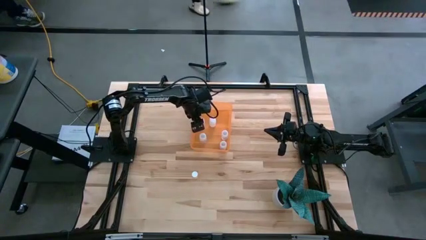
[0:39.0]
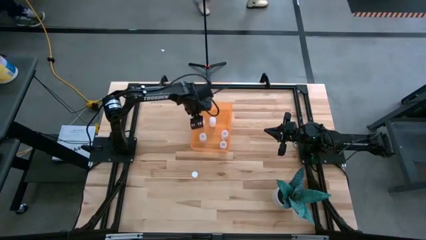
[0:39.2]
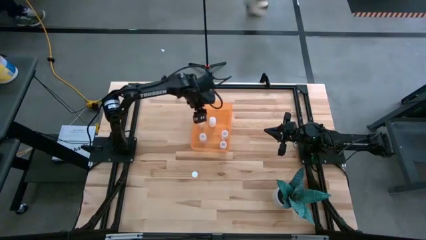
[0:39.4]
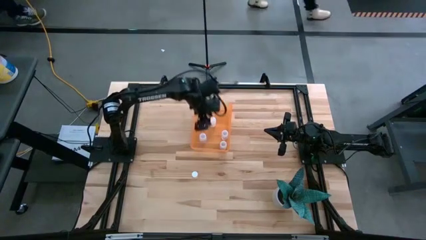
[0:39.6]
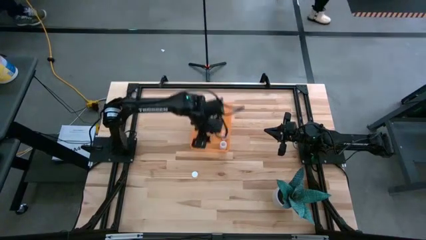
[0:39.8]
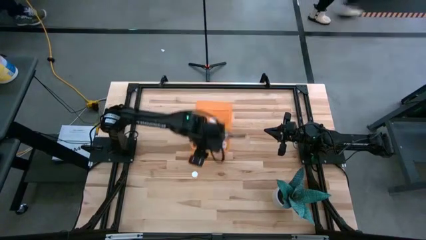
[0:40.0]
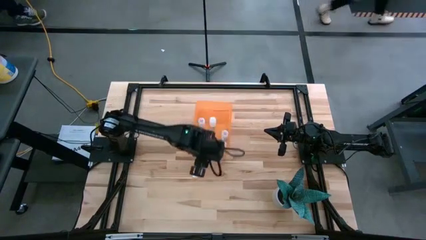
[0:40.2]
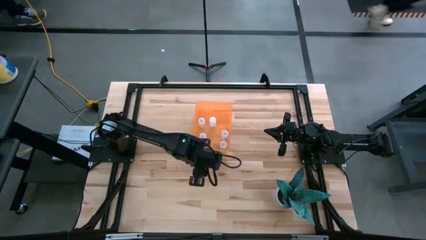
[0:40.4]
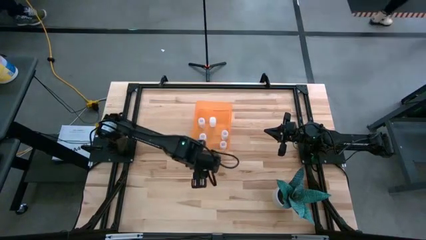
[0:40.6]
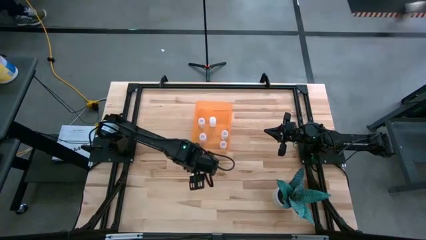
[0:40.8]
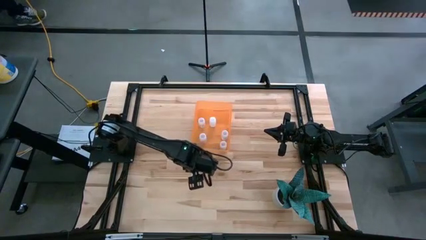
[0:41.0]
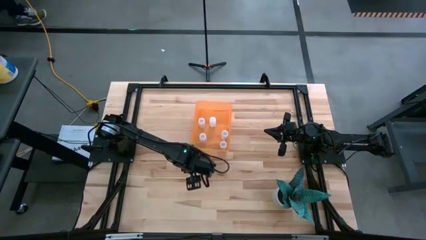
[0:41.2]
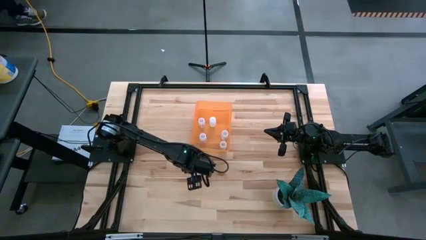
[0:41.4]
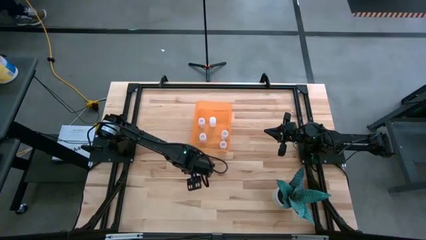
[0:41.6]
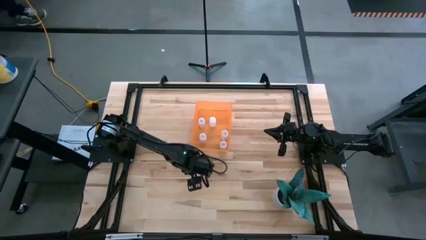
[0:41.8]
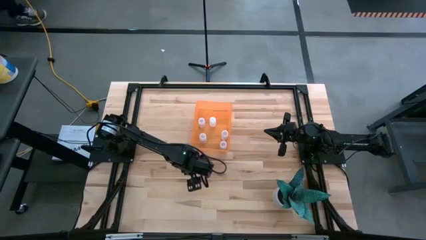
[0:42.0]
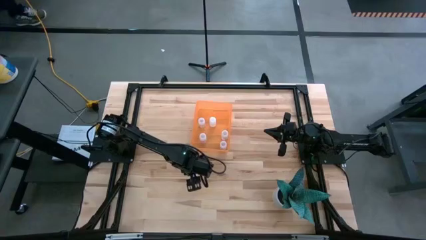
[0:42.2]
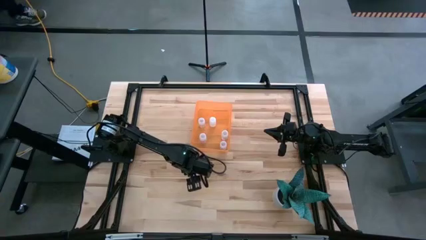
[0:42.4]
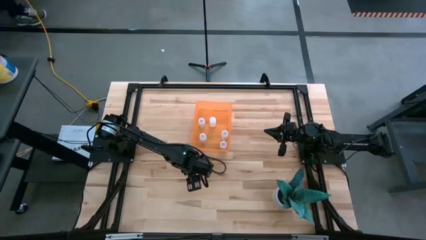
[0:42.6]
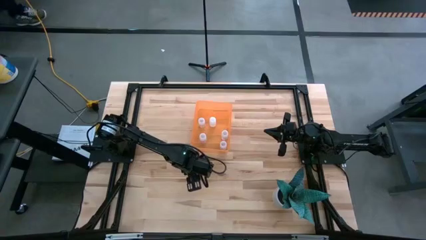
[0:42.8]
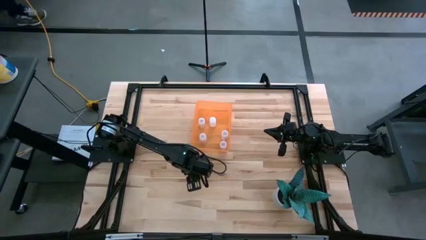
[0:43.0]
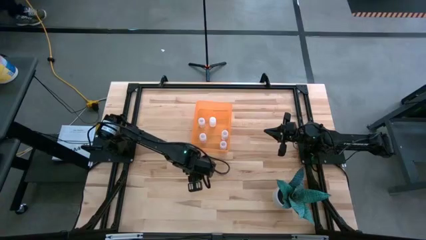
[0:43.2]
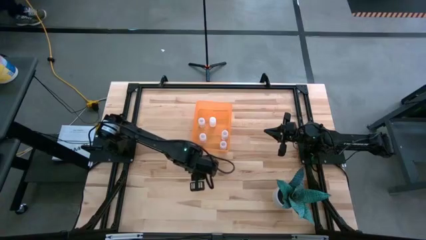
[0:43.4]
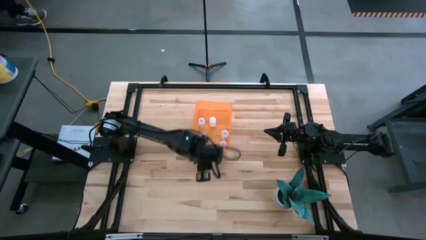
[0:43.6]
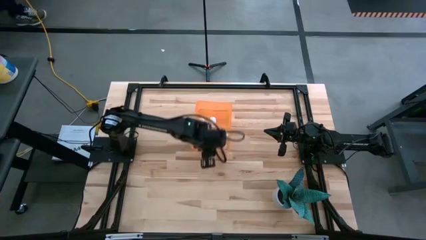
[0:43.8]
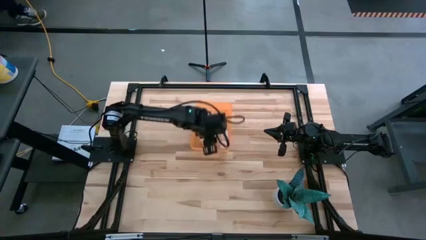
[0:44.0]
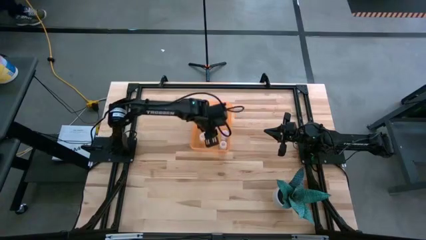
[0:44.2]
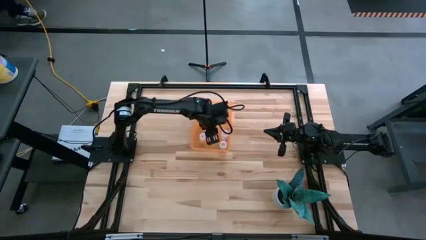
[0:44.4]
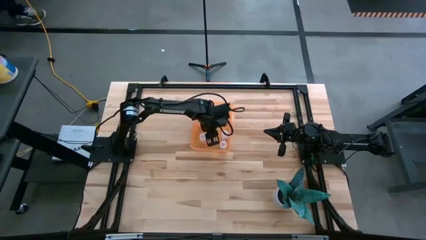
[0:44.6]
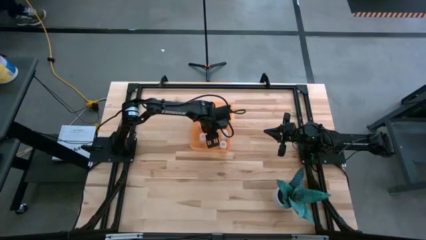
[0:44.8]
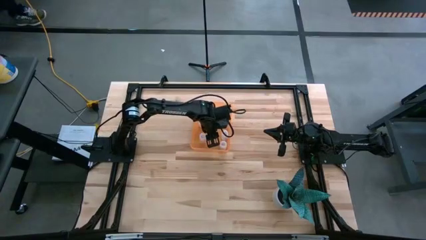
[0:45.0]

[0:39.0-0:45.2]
Task: Pick and place pill bottles into a basket
Put the yellow medicine bottle into the yellow bin

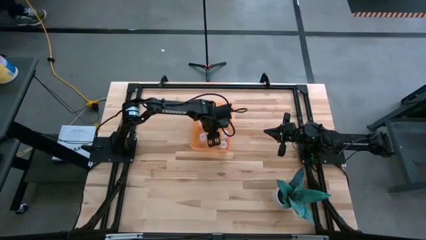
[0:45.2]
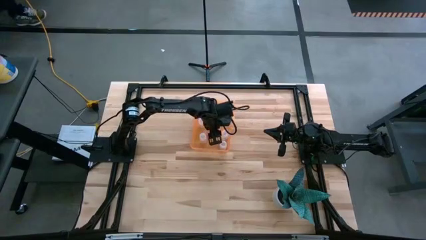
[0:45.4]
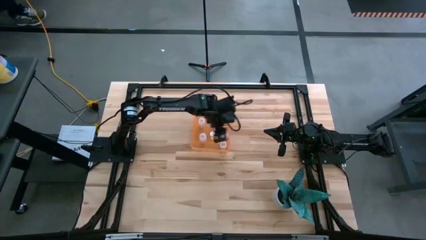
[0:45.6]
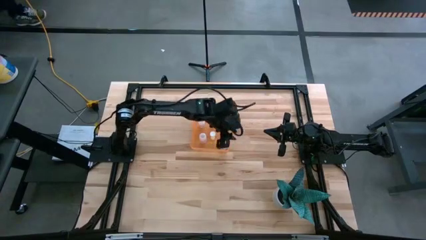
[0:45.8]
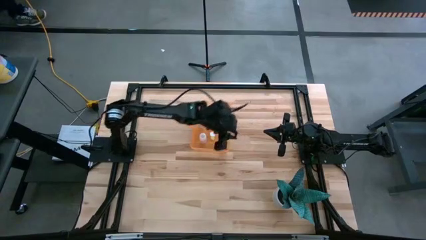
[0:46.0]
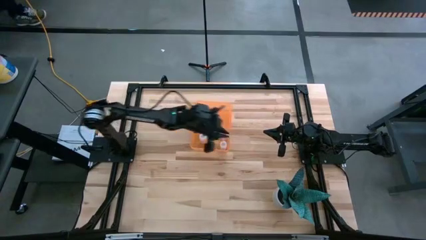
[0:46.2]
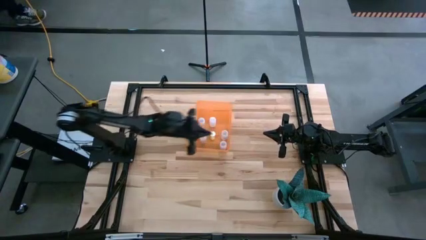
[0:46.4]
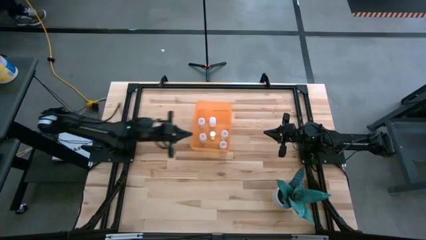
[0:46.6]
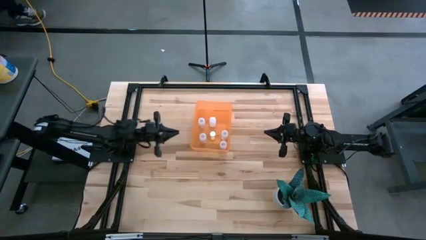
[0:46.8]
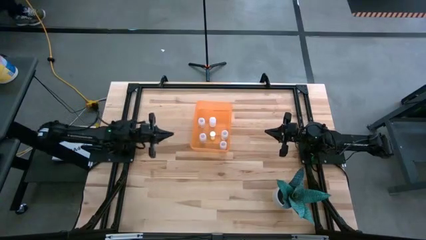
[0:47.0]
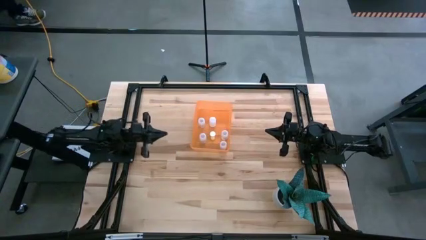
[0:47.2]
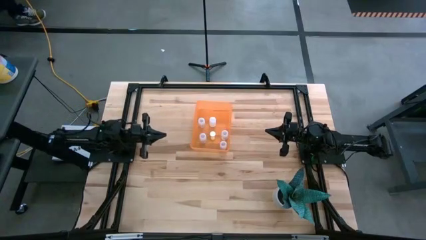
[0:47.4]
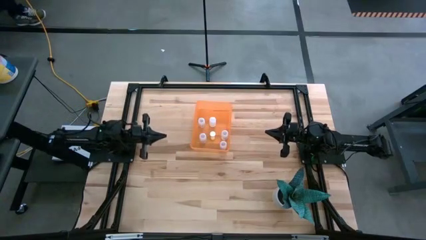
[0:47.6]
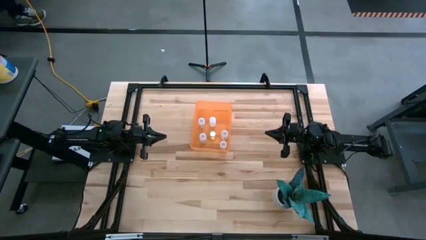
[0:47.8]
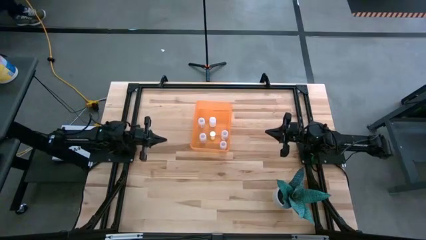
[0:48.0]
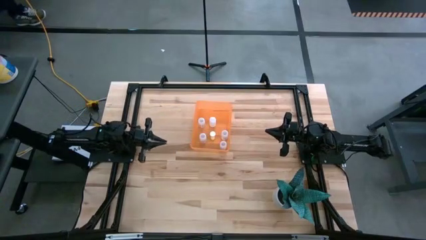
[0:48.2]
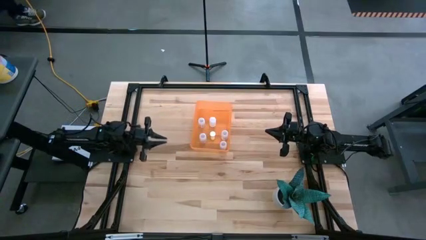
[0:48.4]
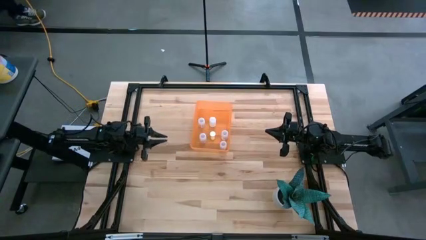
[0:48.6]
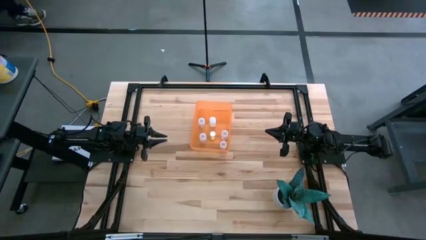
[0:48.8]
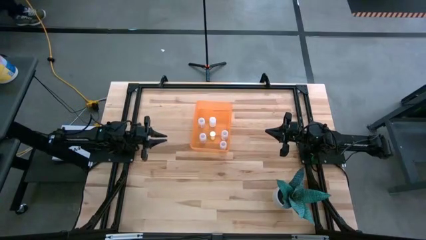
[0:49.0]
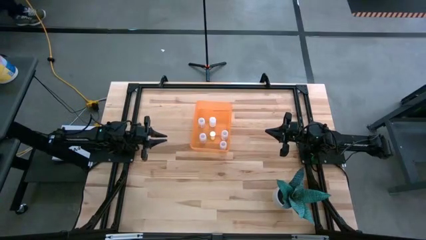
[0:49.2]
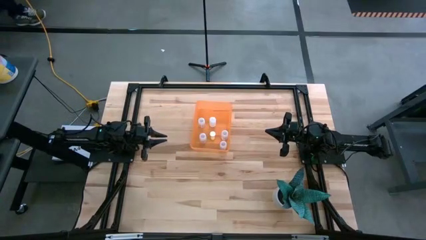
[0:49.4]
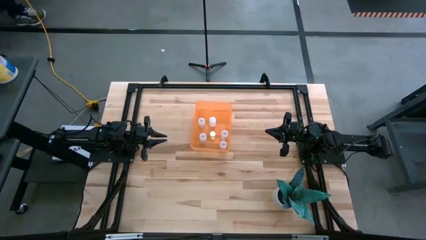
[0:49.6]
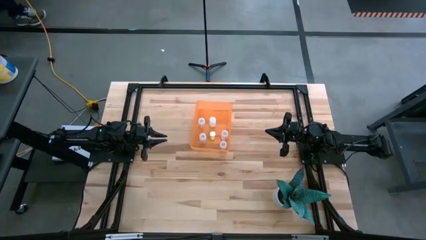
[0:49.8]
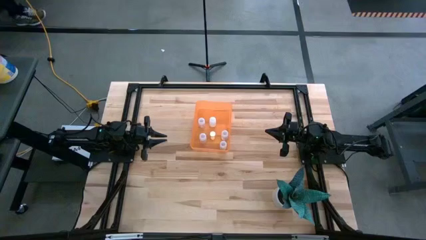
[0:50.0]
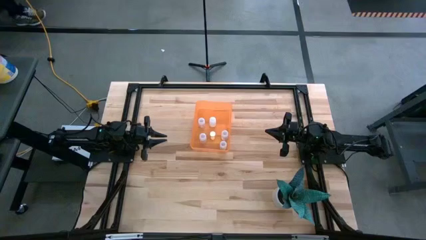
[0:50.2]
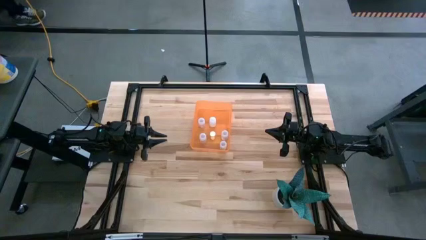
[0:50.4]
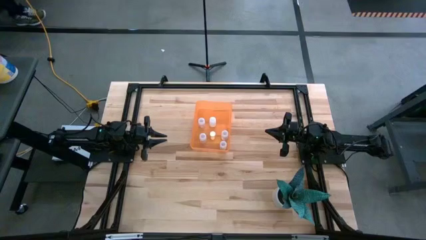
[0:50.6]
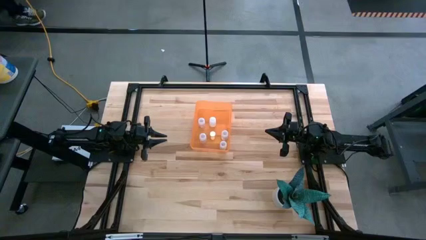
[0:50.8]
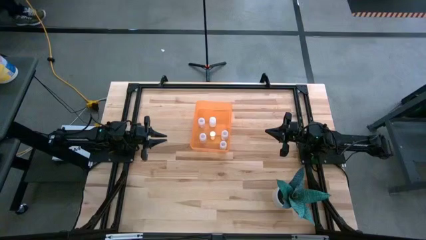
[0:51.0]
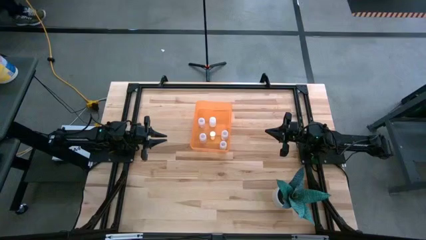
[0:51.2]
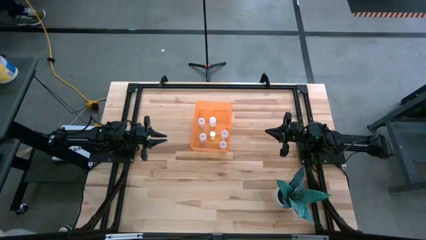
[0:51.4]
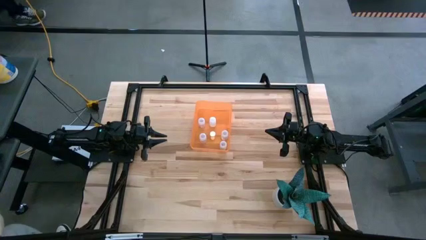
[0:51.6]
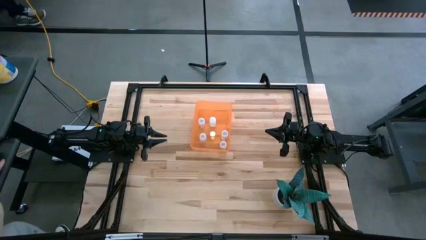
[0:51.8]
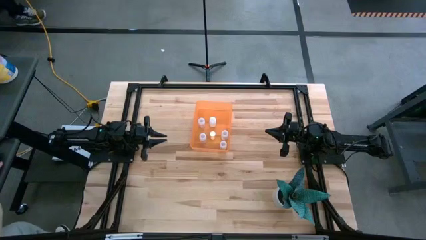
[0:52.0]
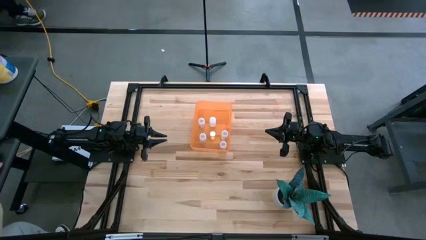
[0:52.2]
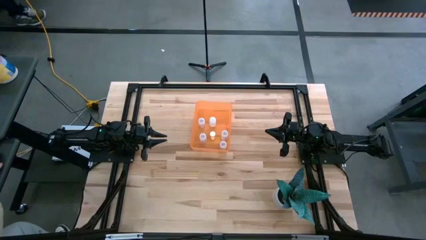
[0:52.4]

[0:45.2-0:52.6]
Return to Home Position

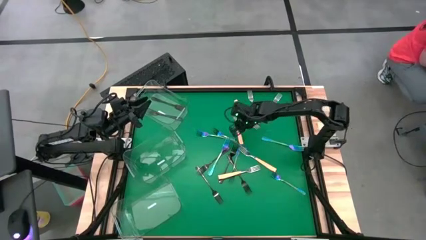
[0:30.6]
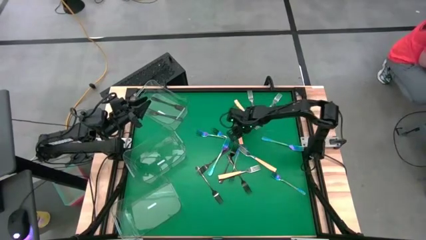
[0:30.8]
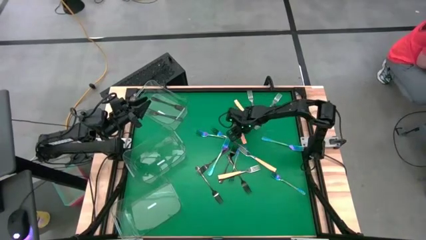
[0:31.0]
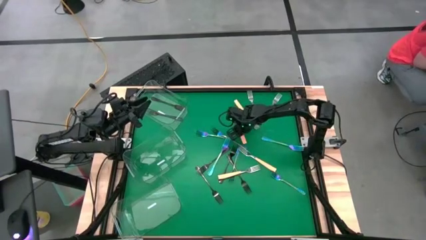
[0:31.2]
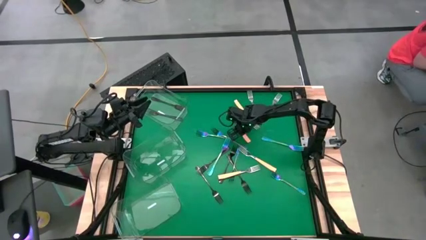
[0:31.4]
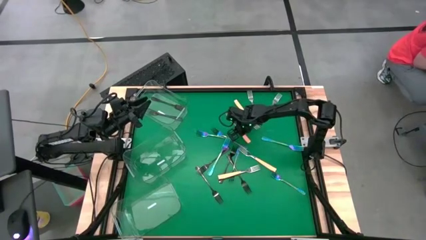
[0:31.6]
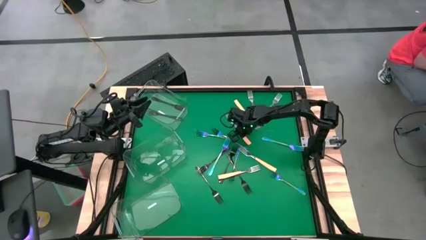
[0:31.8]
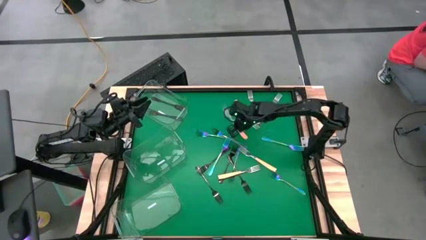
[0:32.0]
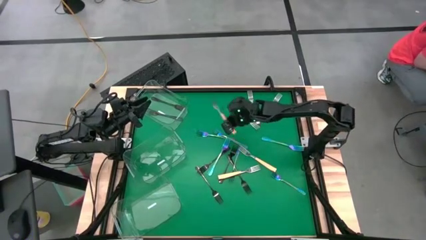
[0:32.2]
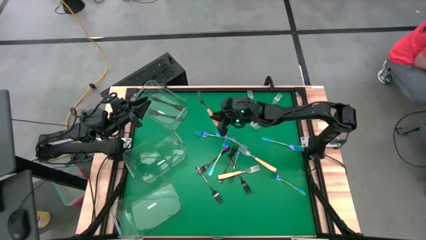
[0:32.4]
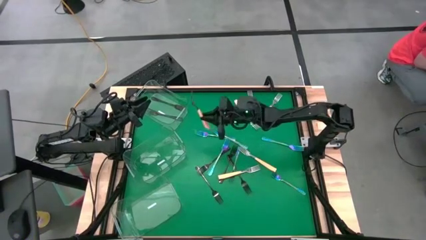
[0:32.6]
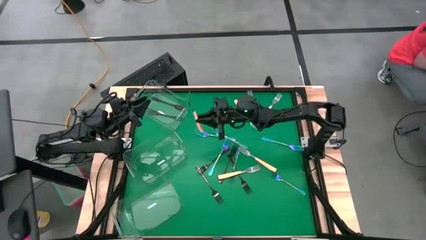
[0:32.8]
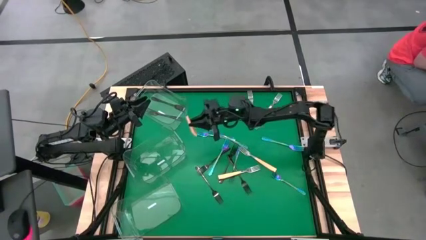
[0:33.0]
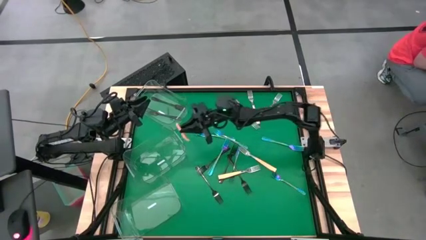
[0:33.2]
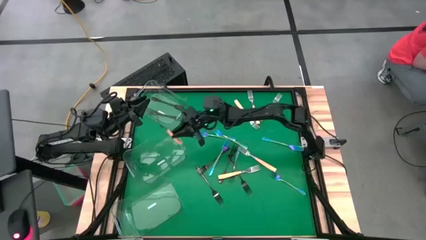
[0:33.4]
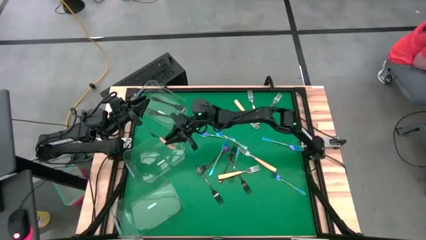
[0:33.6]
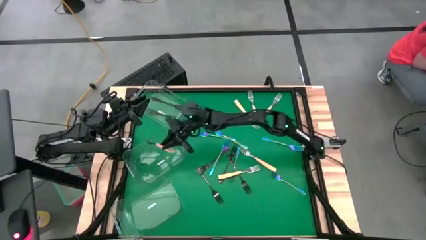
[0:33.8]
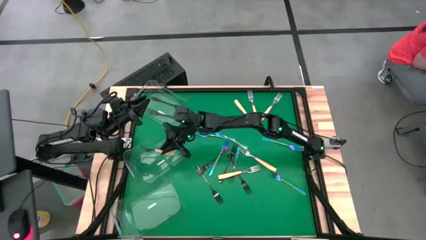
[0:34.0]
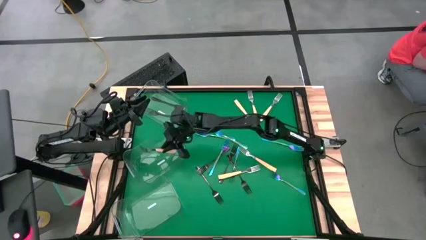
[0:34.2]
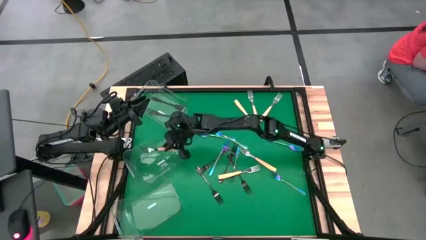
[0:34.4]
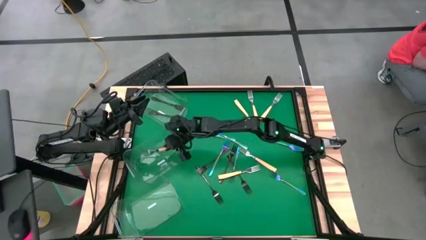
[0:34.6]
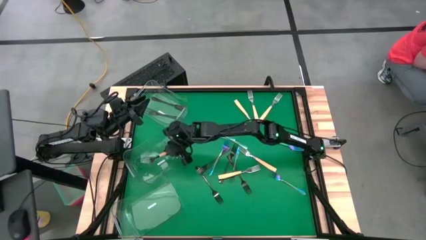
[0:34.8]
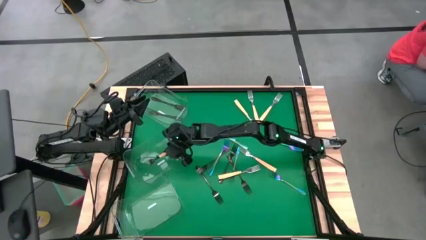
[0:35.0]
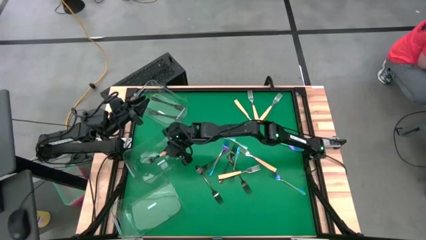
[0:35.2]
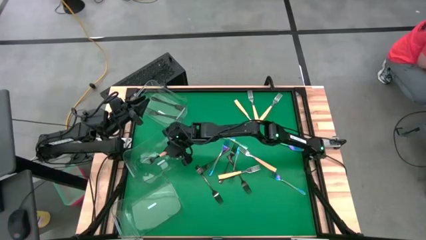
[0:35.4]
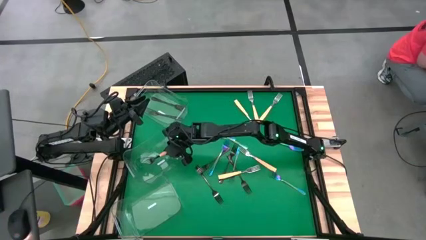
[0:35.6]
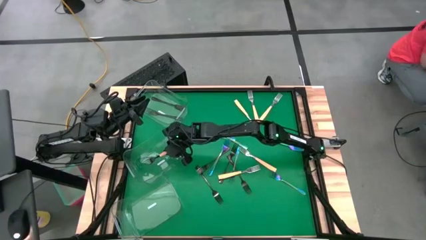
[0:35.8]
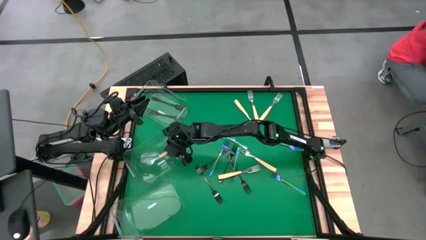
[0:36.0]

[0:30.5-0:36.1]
Task: Sort silverware by color (type)
Put the orange fork into the middle transparent bin
